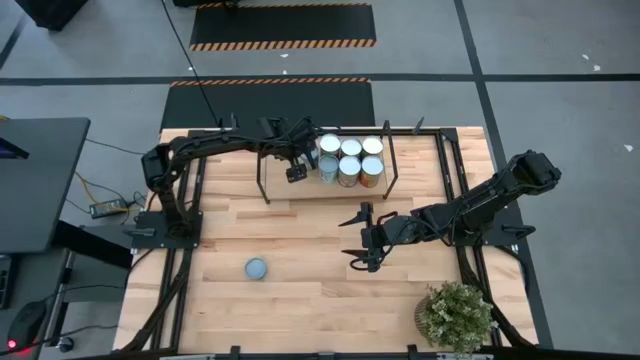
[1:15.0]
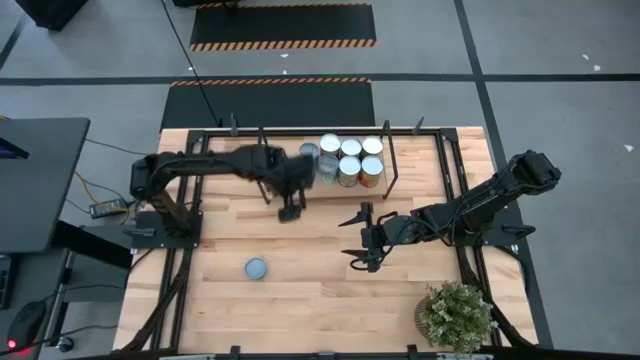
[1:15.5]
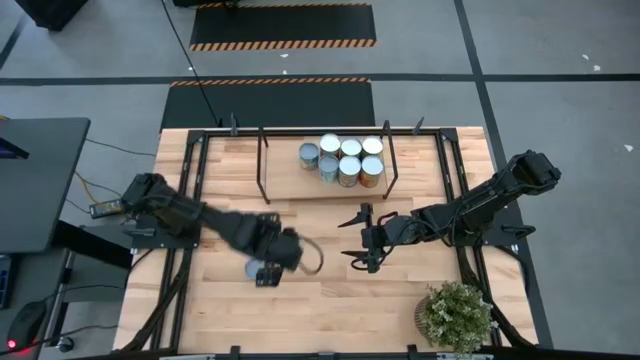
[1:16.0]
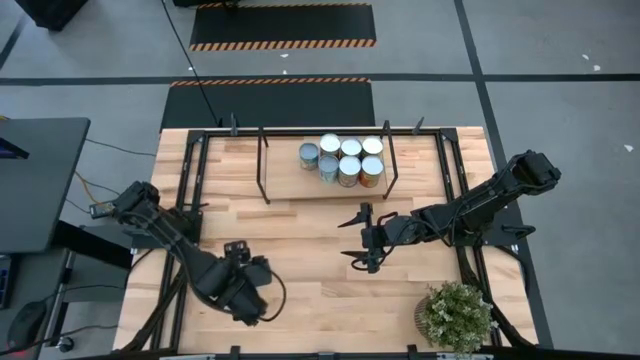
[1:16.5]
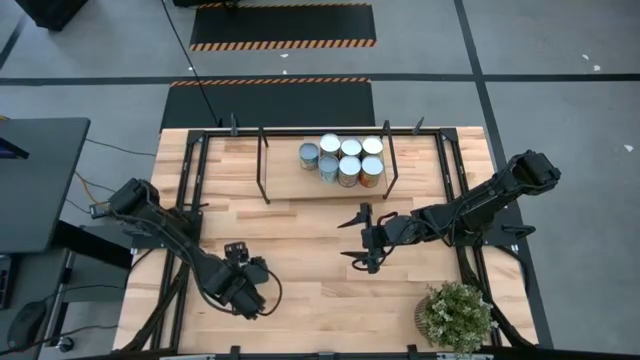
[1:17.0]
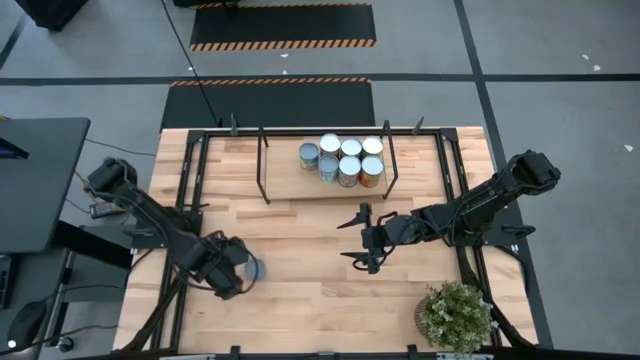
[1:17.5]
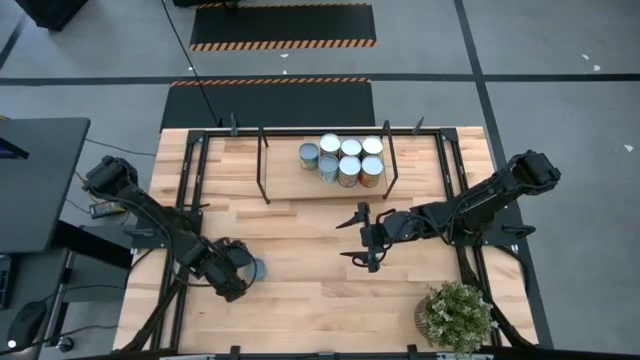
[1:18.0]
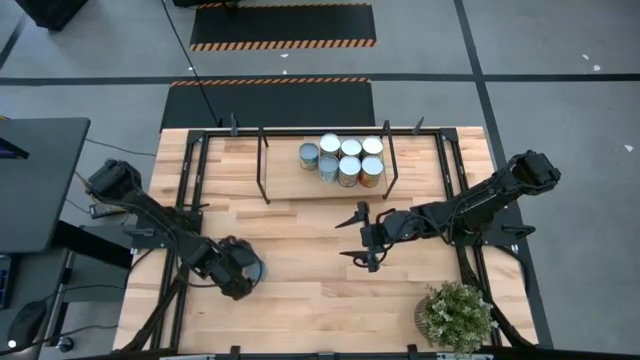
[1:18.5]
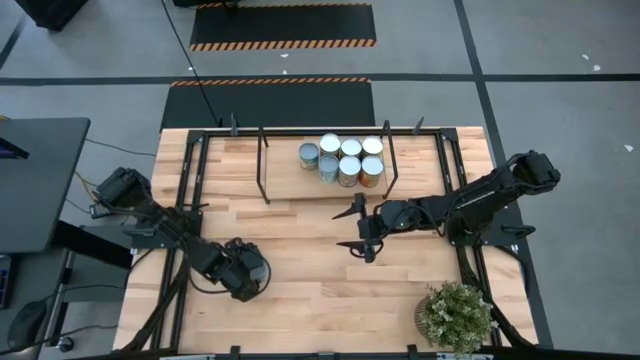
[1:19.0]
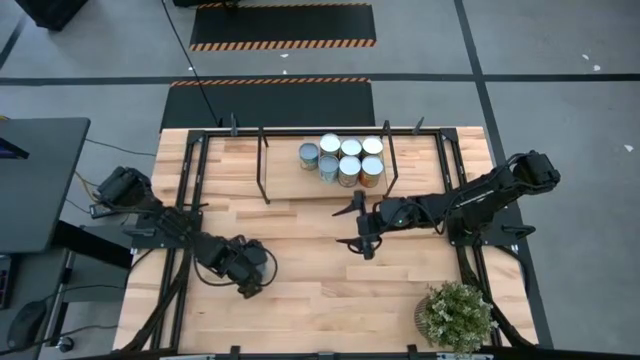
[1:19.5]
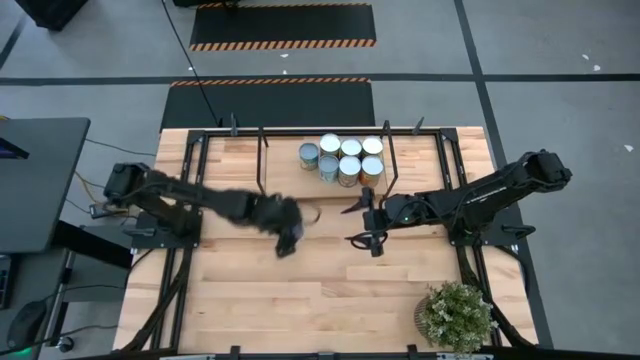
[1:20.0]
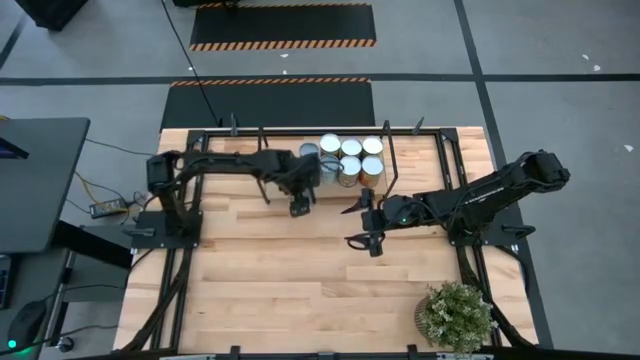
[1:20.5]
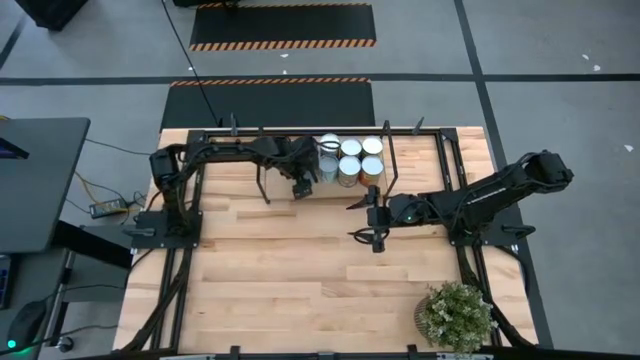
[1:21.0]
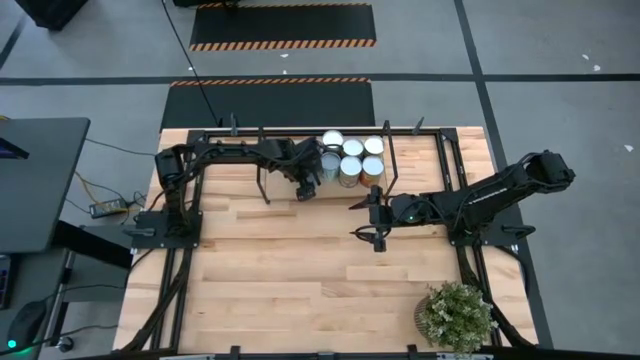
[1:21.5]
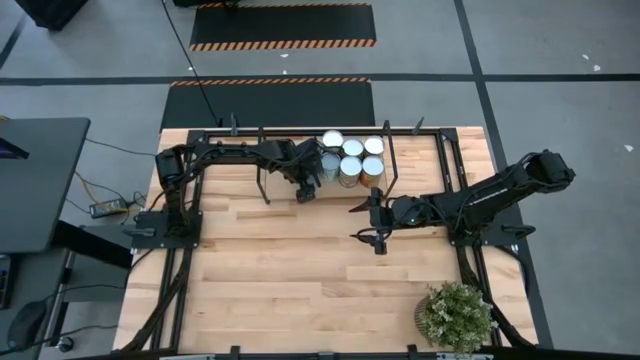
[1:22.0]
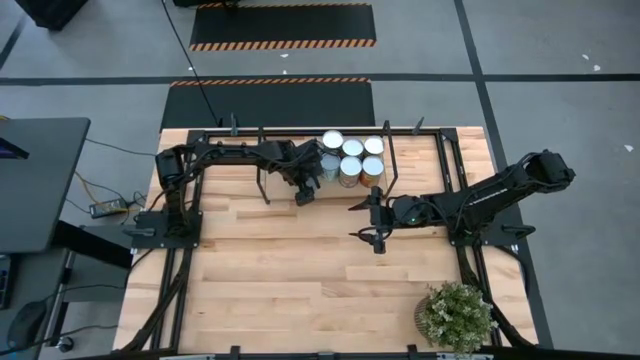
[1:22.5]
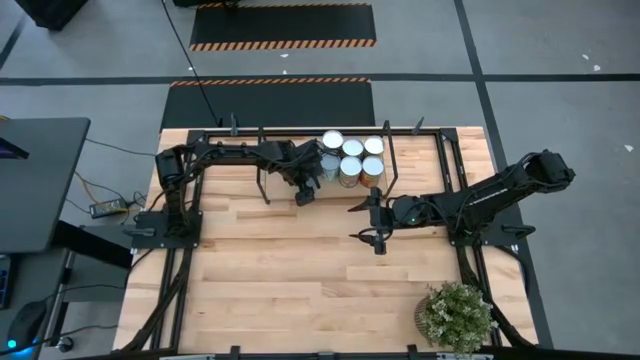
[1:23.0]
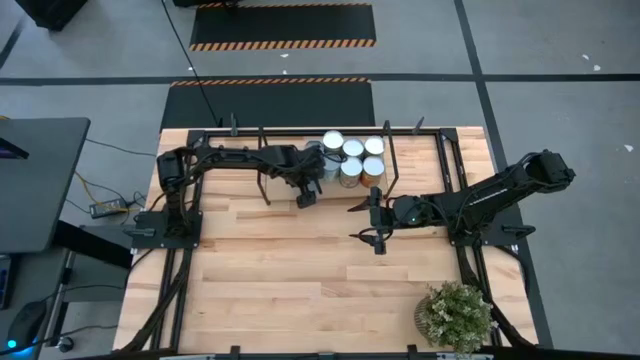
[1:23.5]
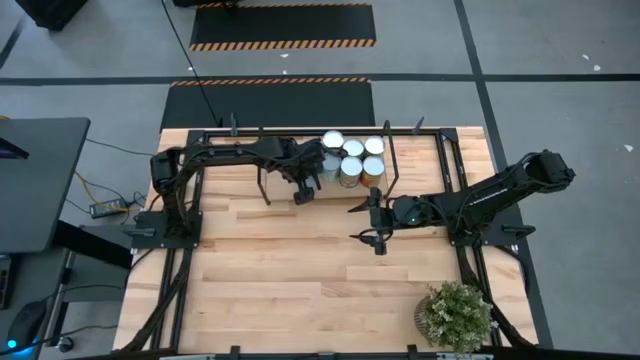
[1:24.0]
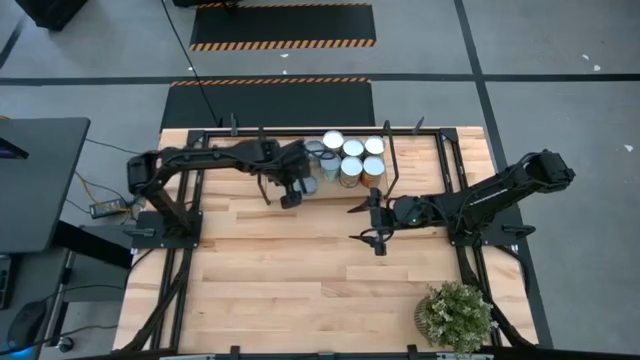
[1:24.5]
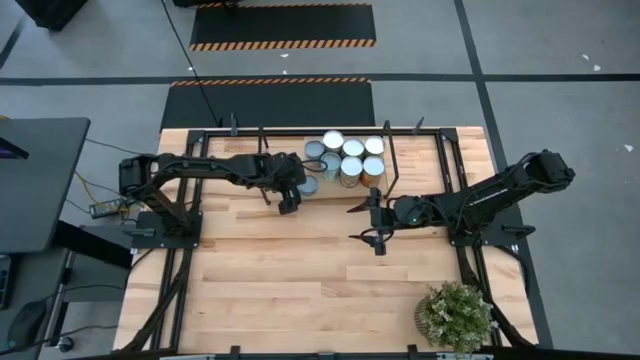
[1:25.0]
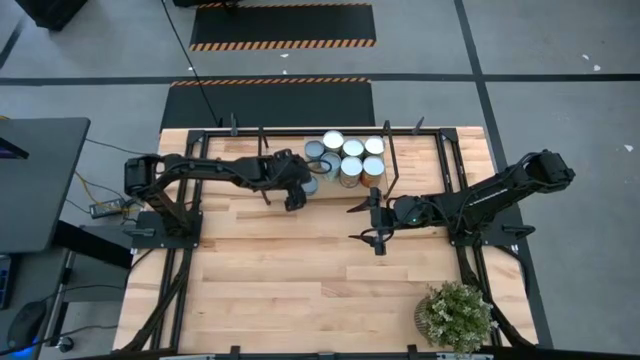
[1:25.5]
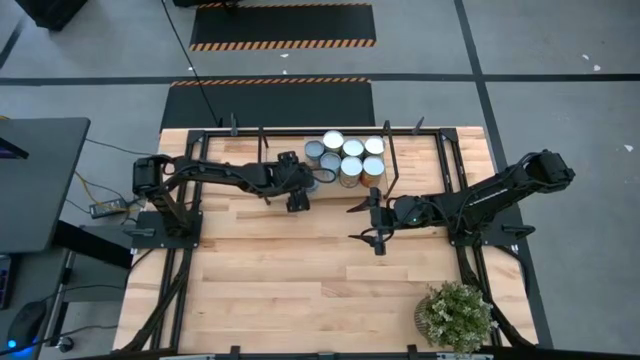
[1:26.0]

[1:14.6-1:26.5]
Task: Pick and place cans onto a shelf
Put the canned tuna fish on the shelf

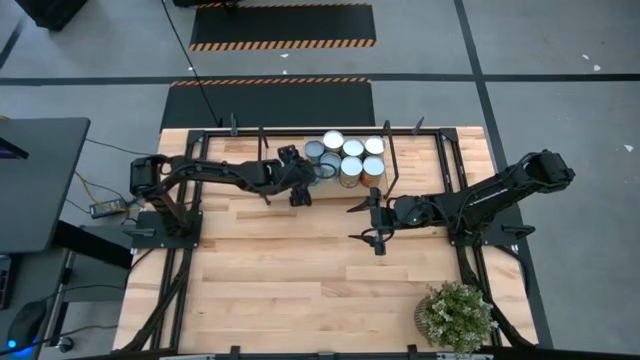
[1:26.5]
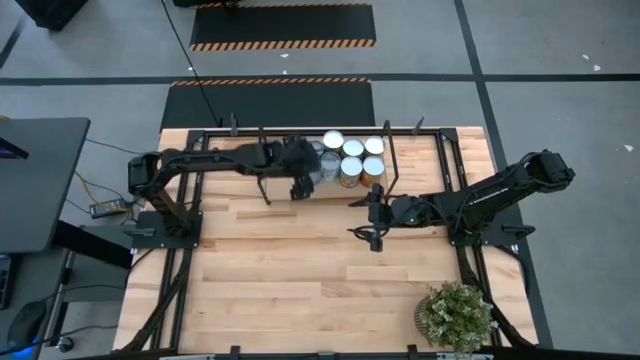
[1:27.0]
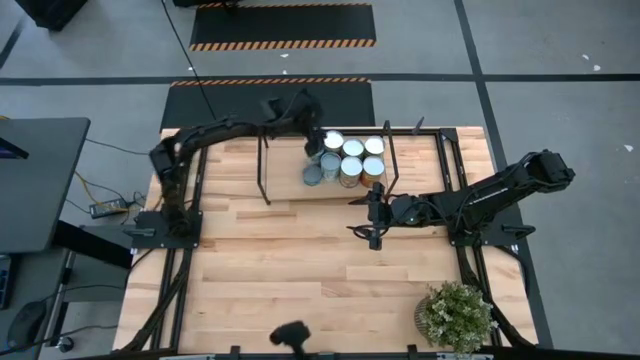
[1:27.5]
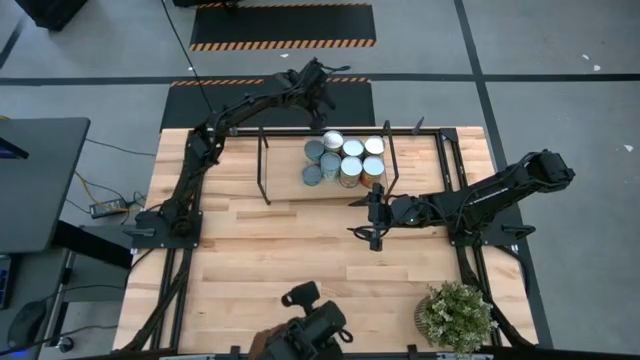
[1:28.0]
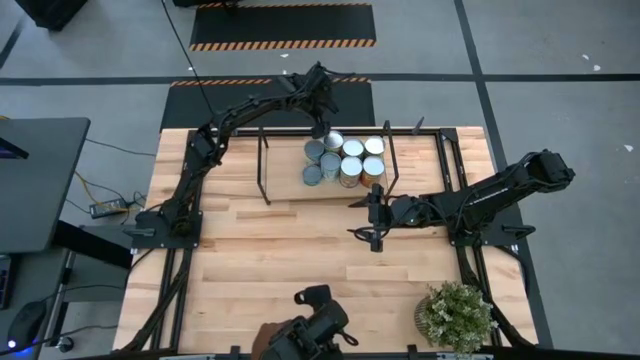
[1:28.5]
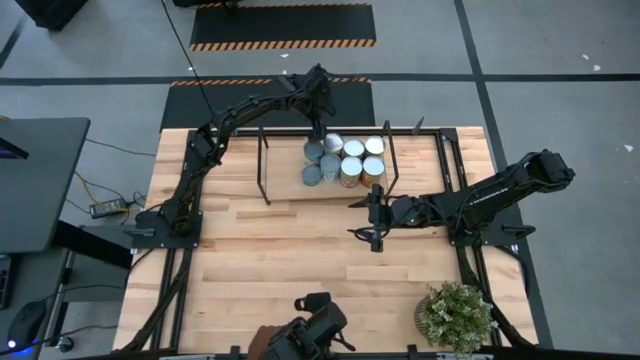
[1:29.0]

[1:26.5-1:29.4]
Adjust the canned corn on the shelf

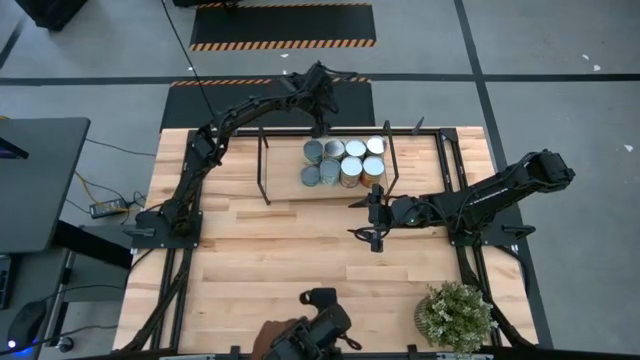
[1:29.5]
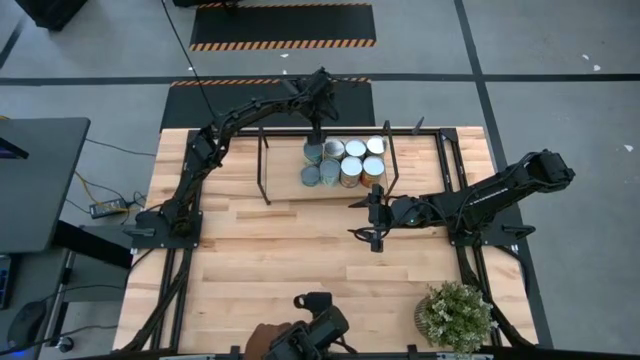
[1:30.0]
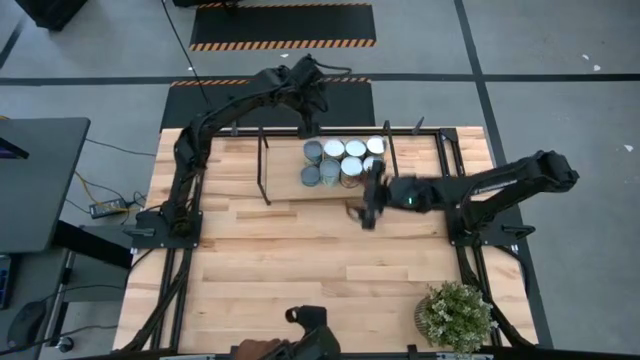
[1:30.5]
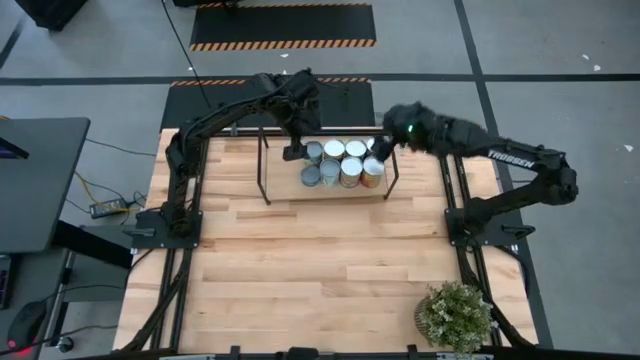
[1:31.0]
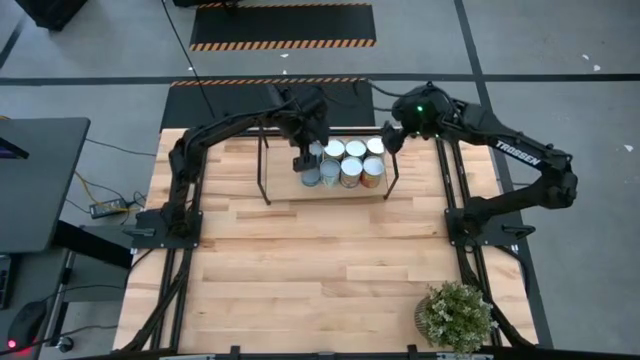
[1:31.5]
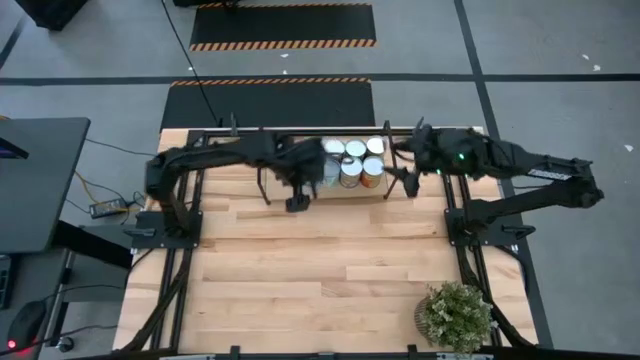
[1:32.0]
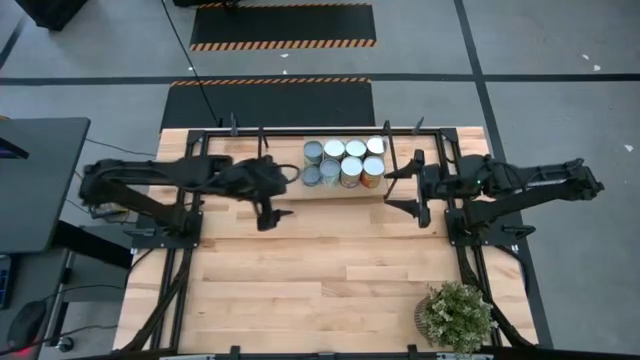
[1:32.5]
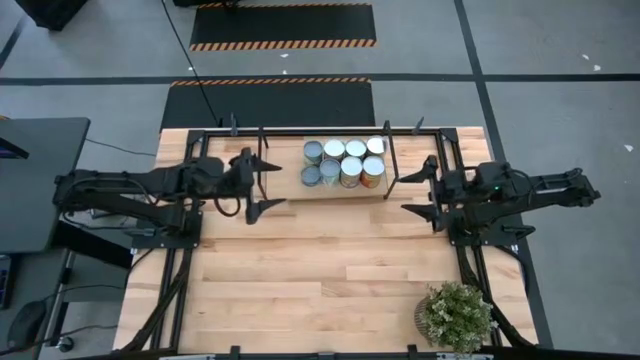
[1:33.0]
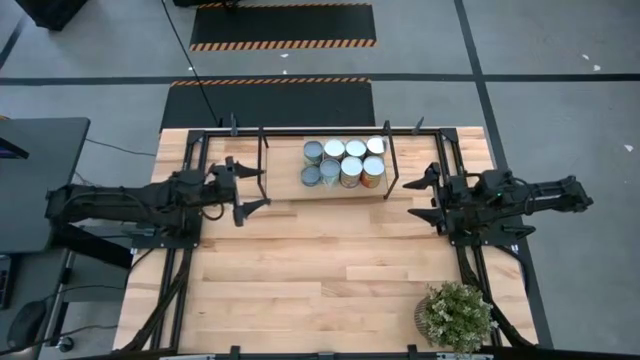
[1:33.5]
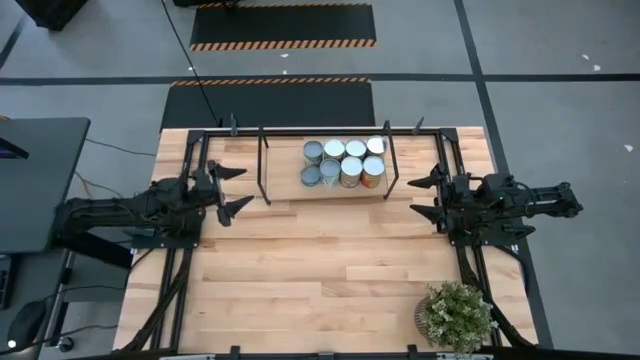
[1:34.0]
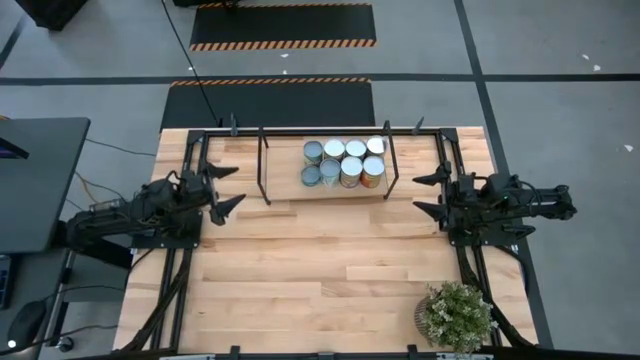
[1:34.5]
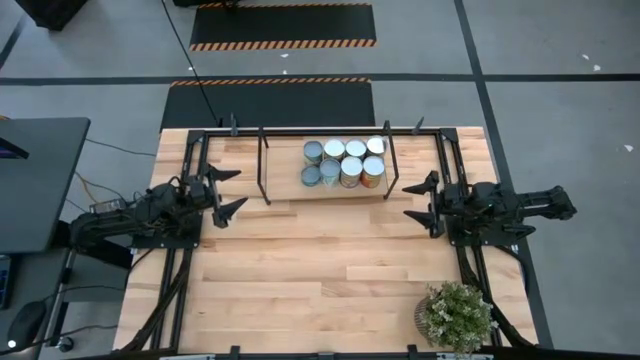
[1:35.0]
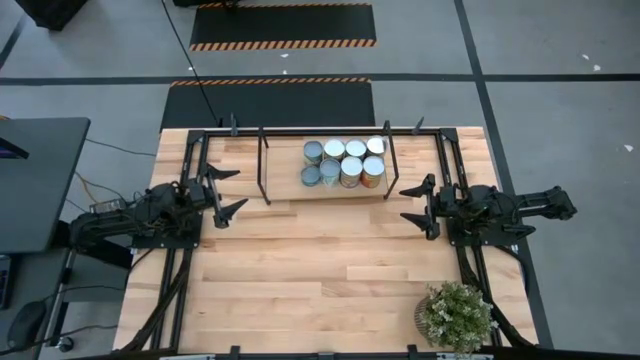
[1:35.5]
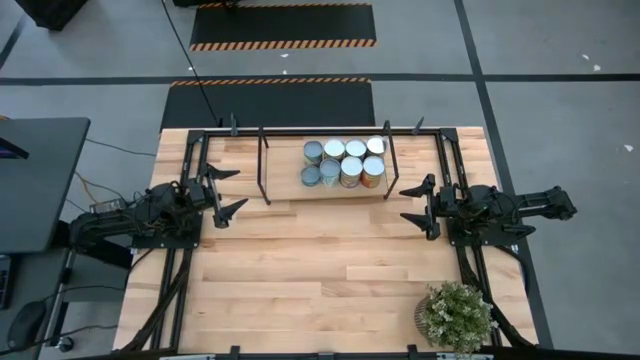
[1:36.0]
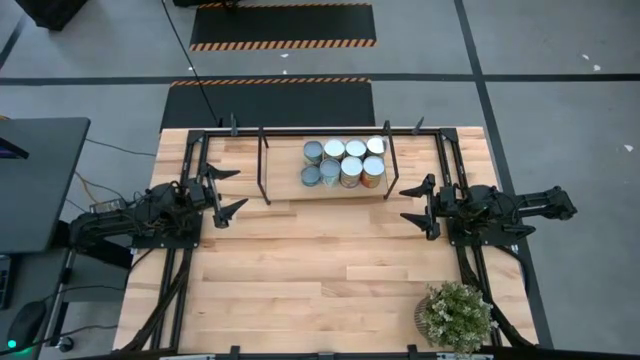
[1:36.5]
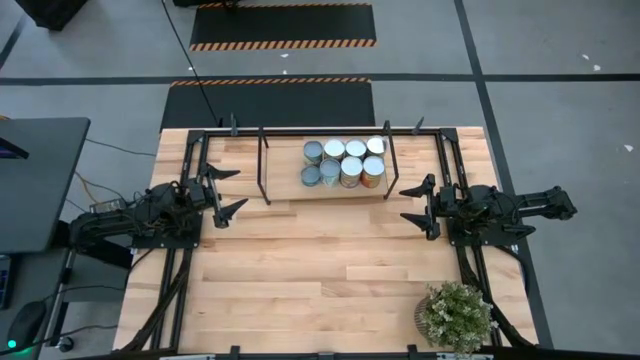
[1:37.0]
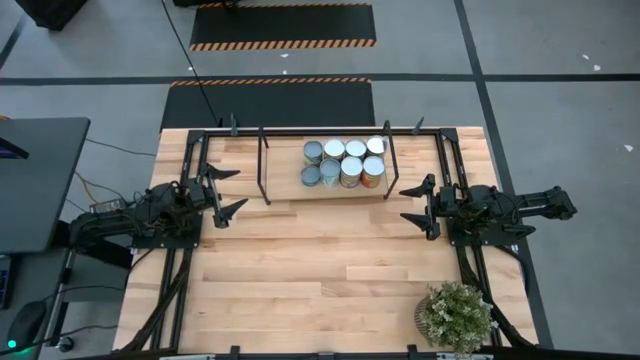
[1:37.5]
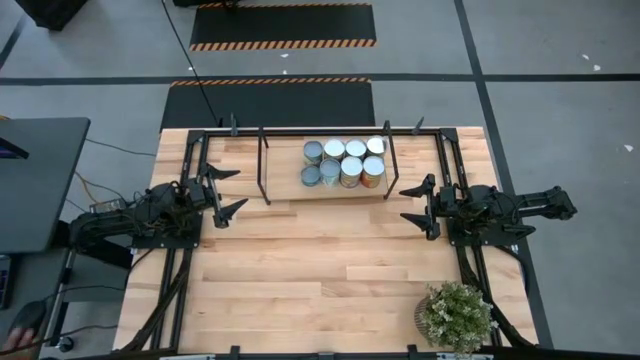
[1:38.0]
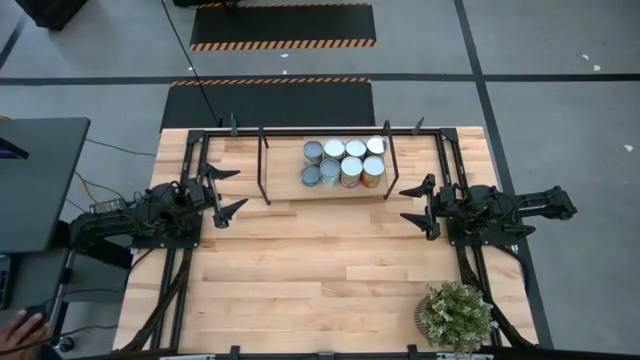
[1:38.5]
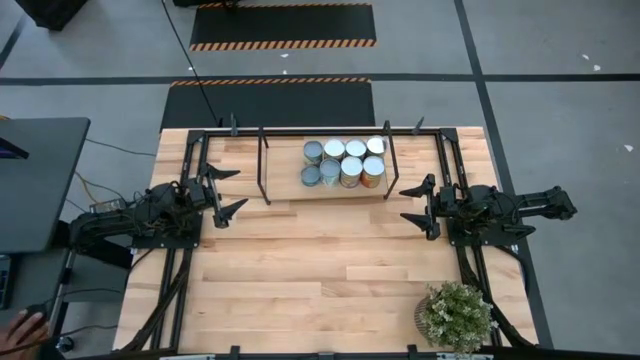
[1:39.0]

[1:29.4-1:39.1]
Return to Home Position
